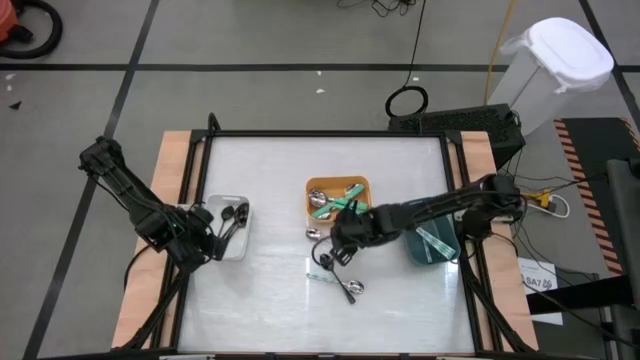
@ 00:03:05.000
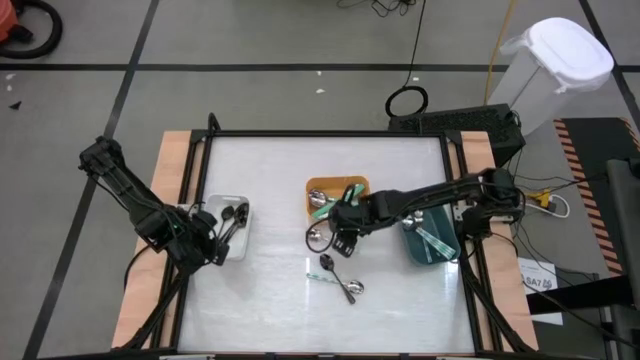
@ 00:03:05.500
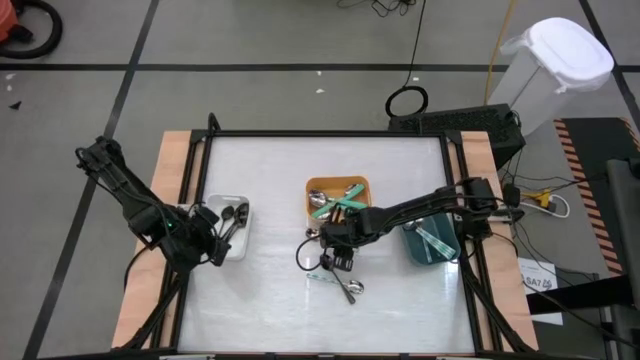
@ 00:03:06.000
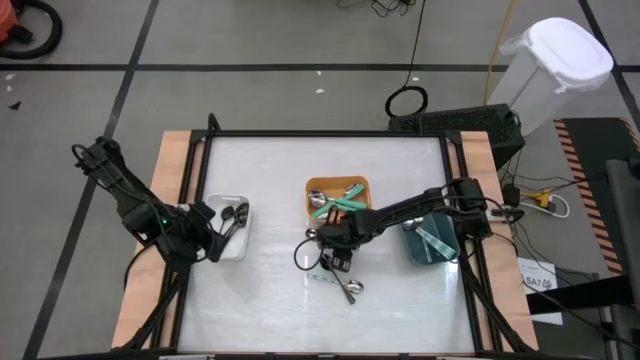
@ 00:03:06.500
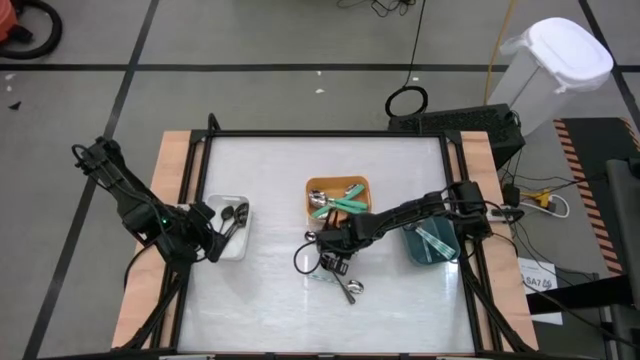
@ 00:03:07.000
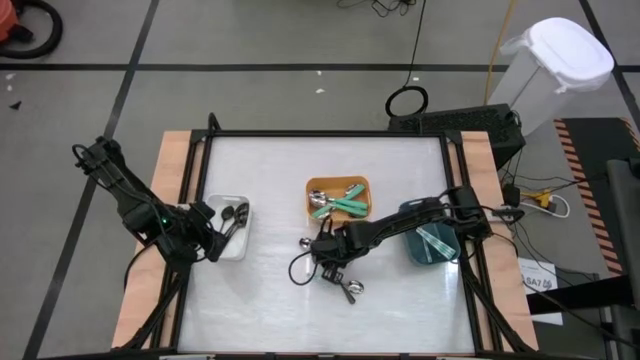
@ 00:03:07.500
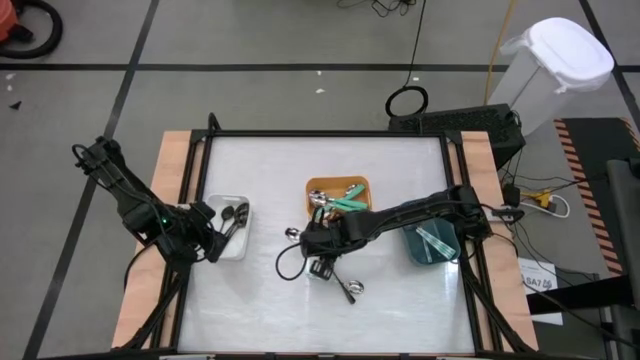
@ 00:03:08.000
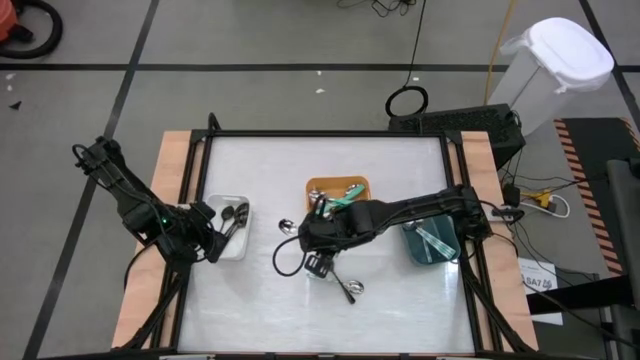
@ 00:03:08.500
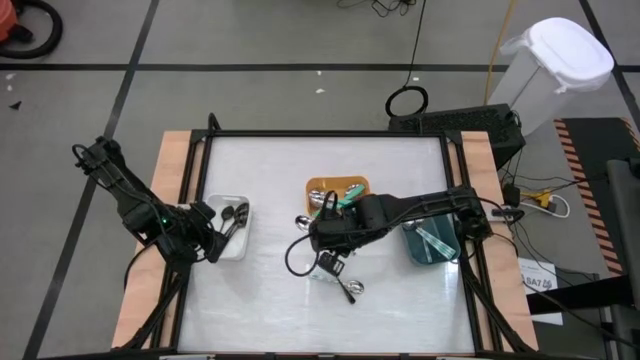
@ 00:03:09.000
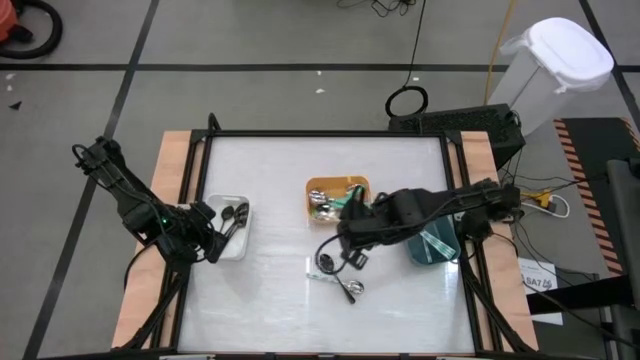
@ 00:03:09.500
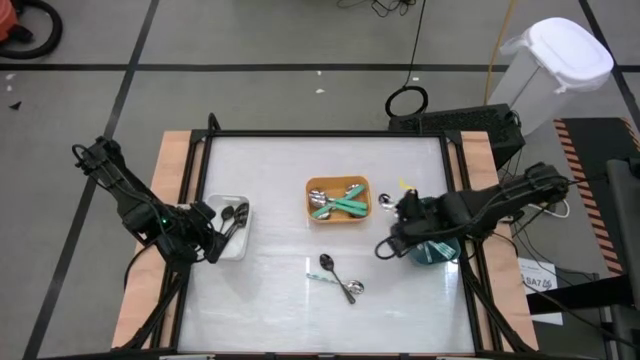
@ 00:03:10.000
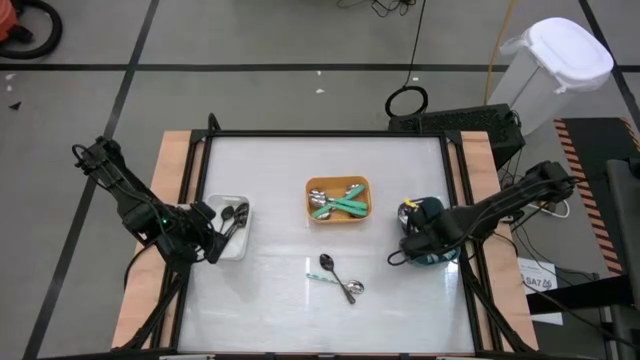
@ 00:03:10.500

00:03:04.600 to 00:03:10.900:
Task: Sort silverware by color (type)
Put the white spoon into the blue bin

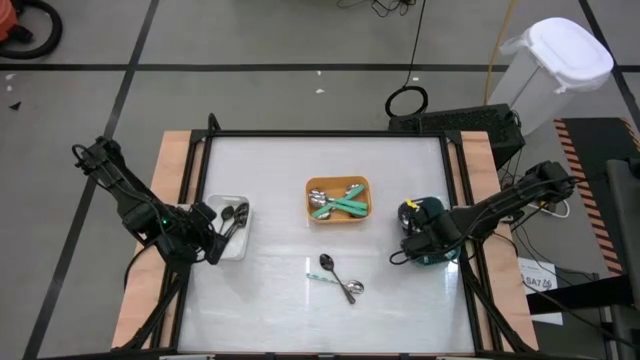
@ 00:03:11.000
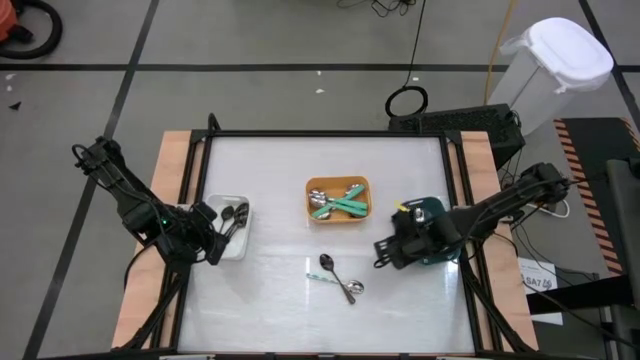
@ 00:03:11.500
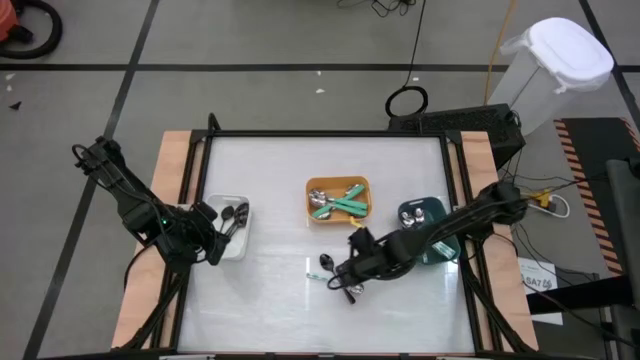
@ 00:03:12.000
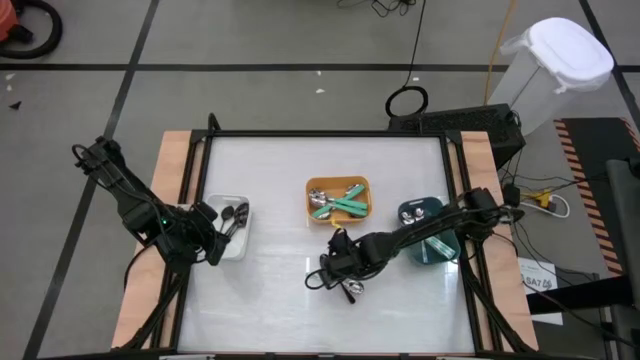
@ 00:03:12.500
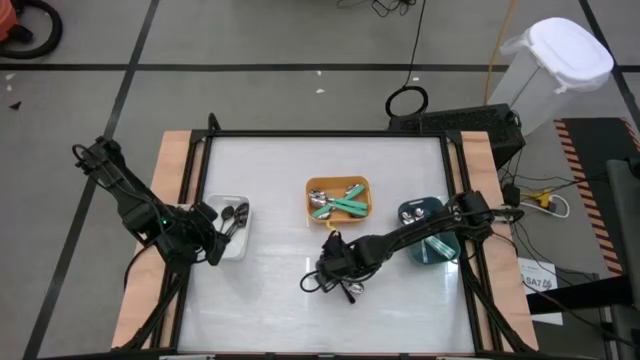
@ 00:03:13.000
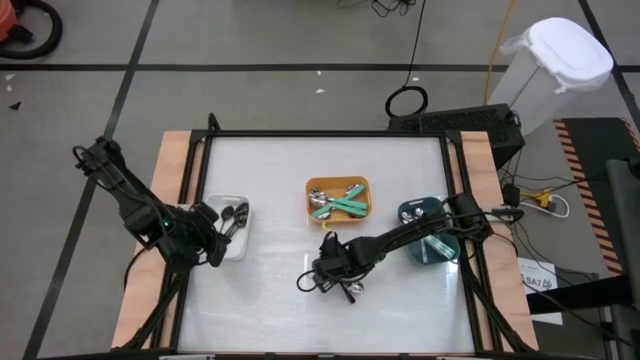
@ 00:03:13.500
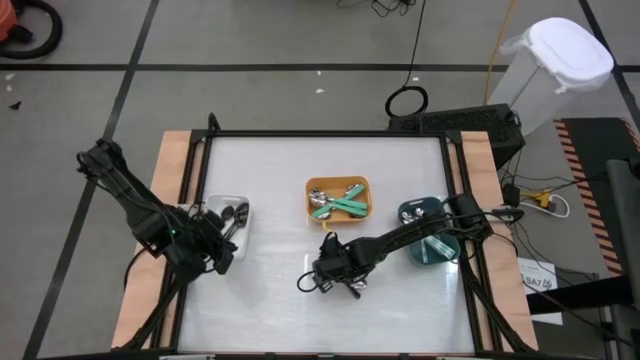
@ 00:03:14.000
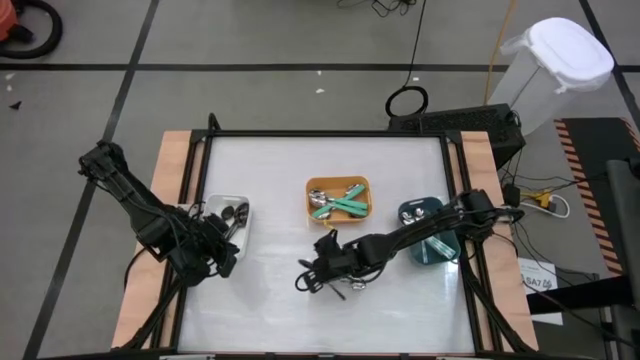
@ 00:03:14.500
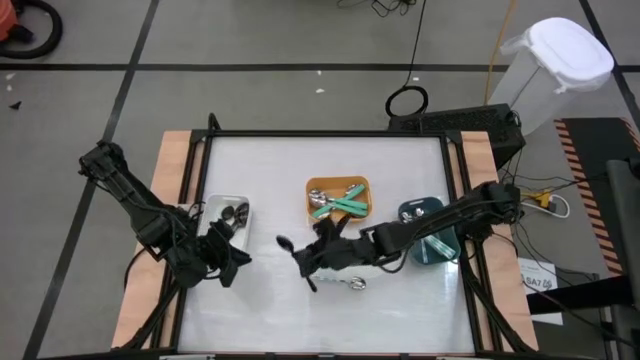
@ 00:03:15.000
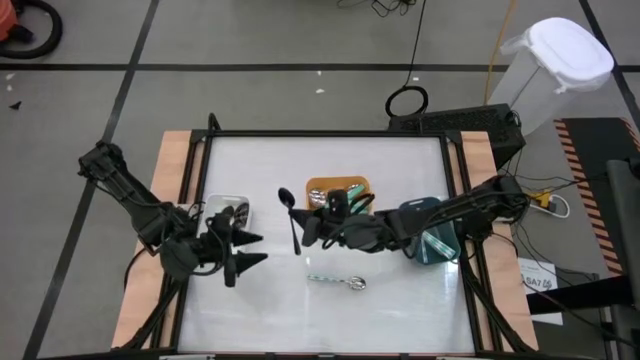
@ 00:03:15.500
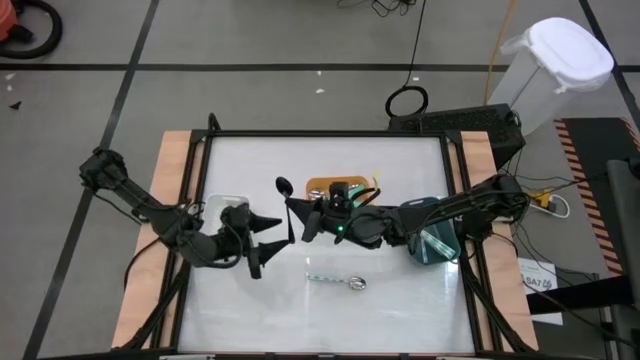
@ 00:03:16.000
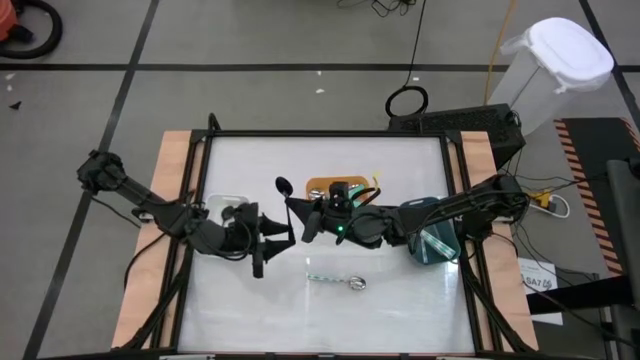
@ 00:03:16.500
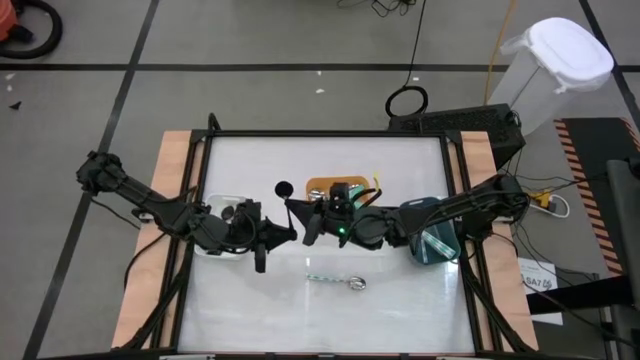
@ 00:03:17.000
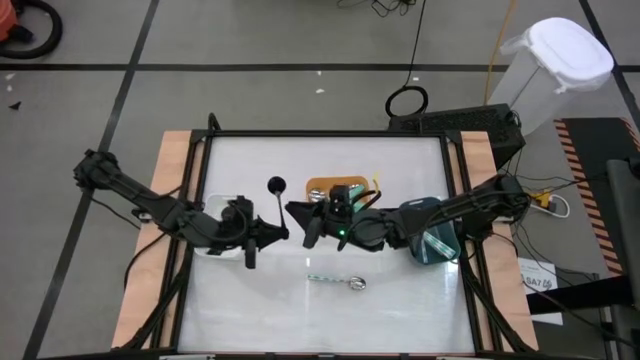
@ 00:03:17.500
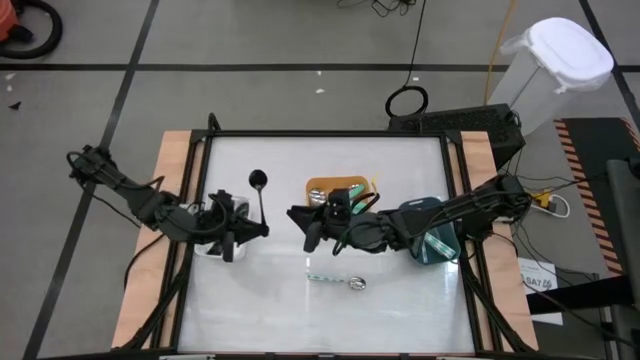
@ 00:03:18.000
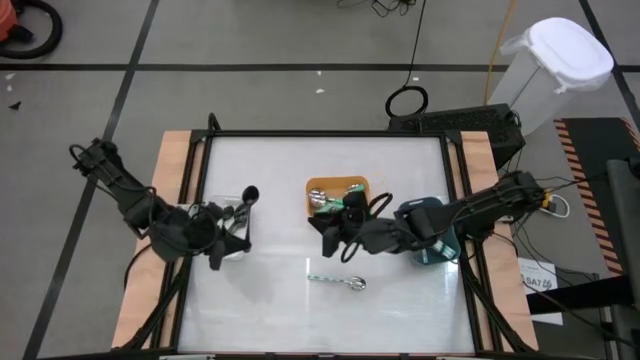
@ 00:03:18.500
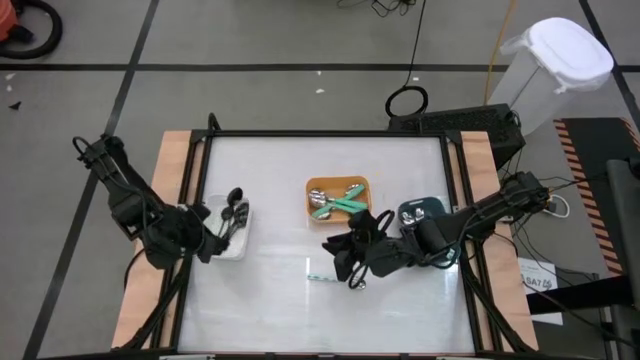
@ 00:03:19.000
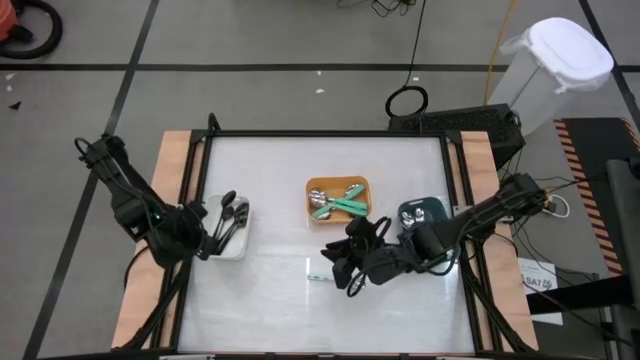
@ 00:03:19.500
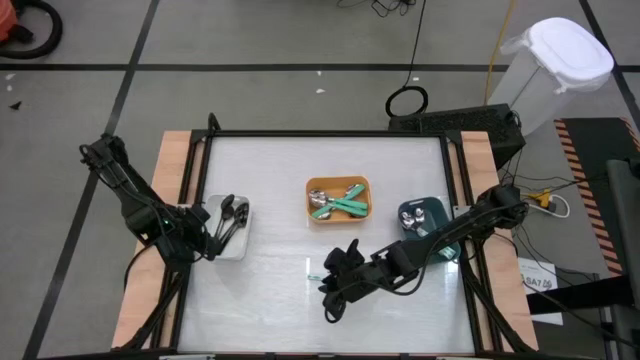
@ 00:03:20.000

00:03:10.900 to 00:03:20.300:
Put the black spoon into the white bin

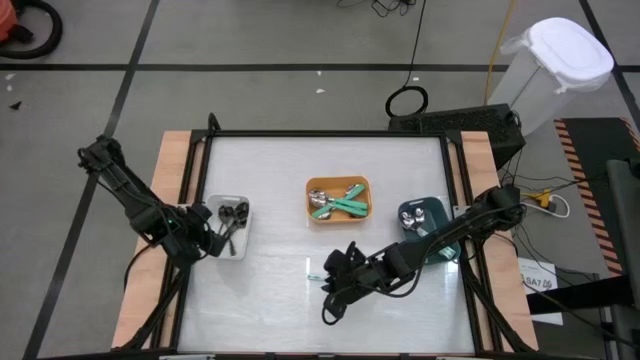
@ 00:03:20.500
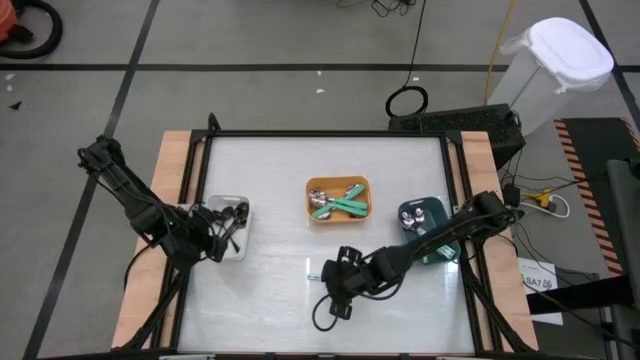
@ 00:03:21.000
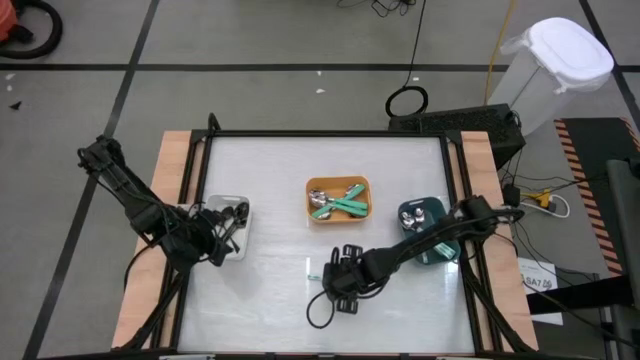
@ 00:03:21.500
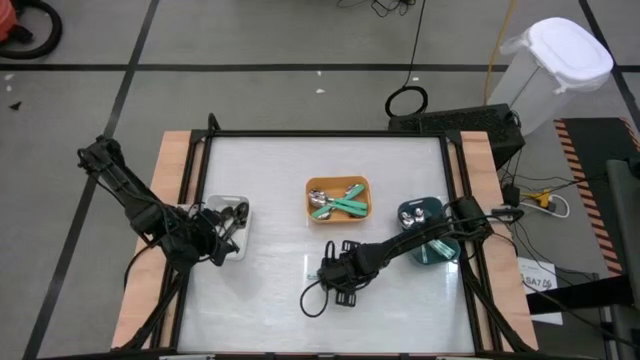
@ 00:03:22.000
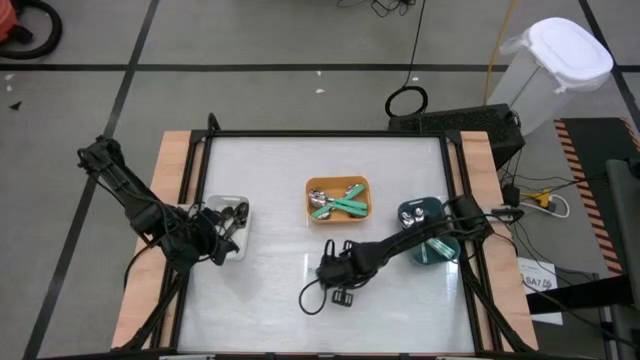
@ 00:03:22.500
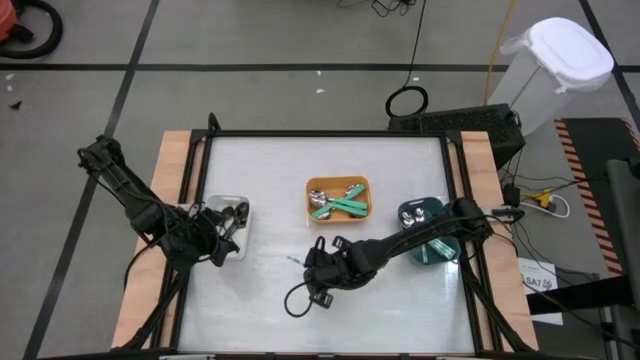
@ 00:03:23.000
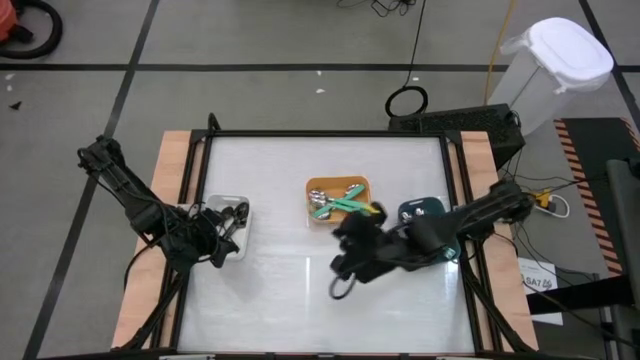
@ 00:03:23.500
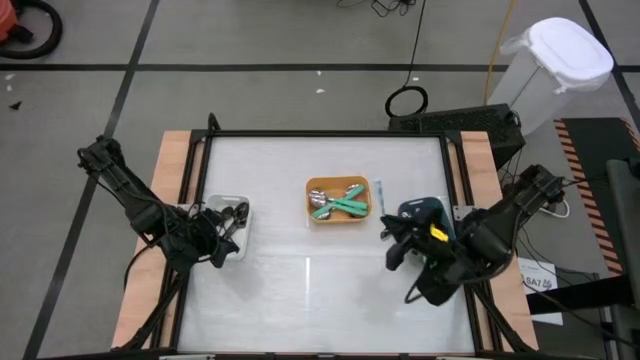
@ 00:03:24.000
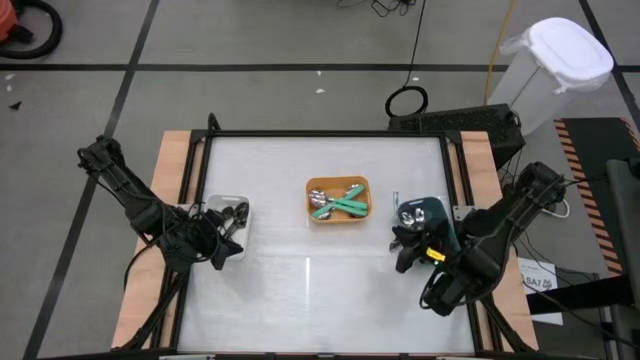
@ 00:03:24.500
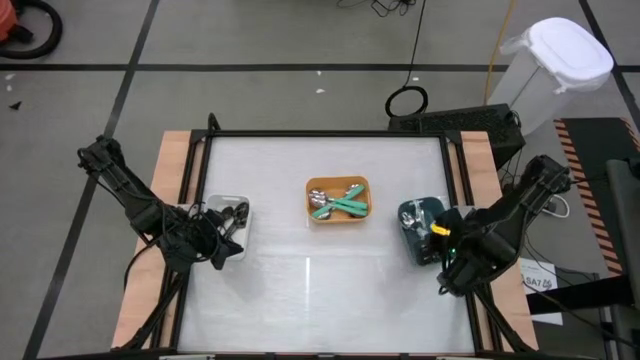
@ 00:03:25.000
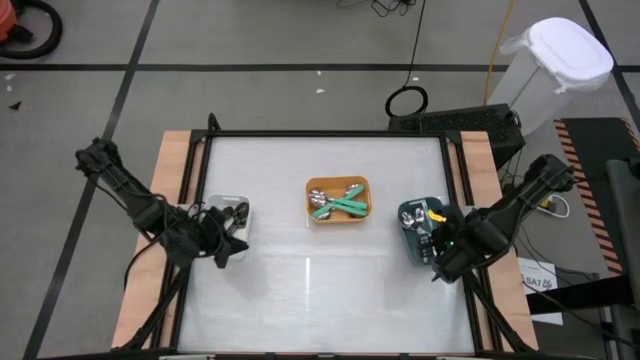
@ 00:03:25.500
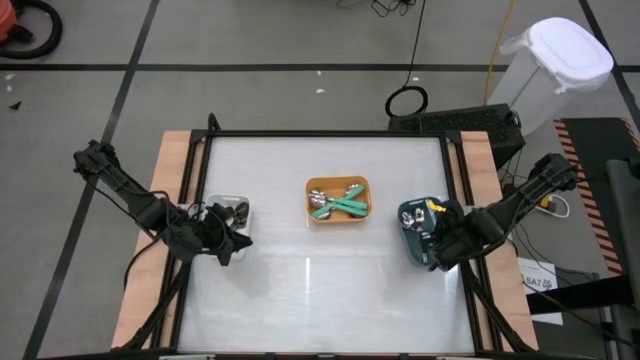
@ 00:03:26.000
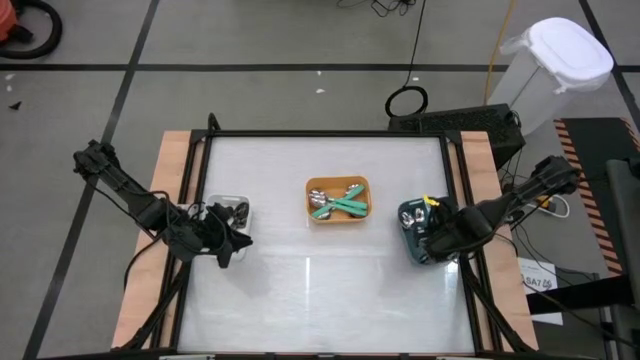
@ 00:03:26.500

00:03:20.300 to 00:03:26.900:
Put the white spoon into the blue bin
